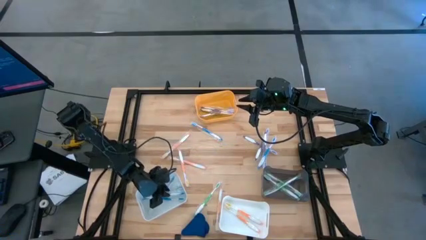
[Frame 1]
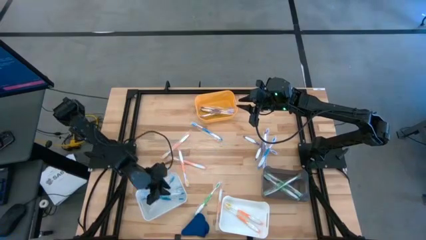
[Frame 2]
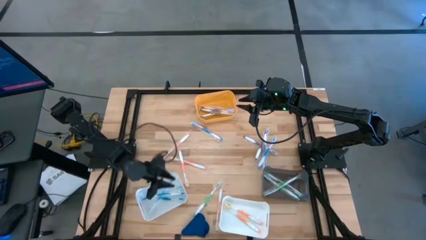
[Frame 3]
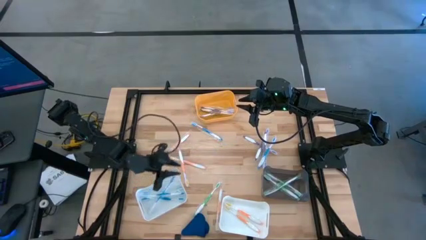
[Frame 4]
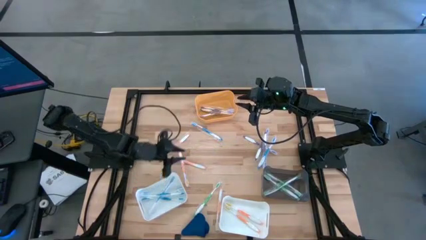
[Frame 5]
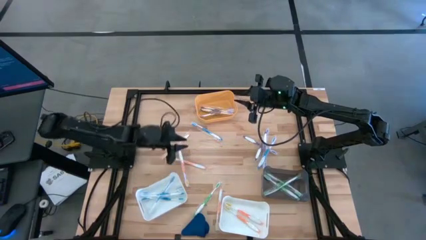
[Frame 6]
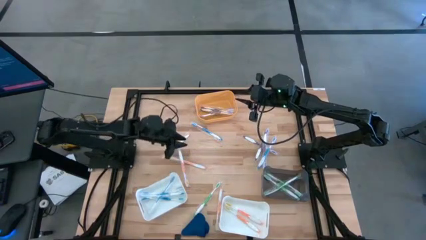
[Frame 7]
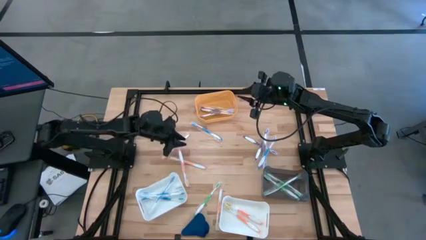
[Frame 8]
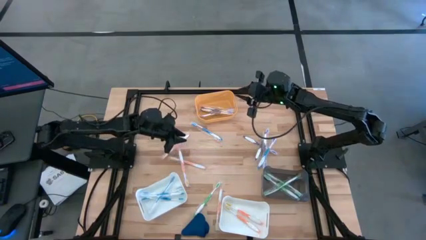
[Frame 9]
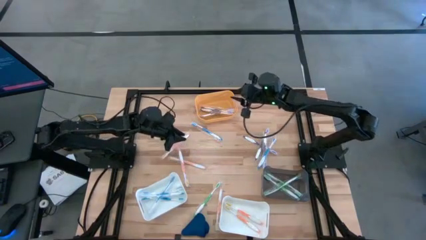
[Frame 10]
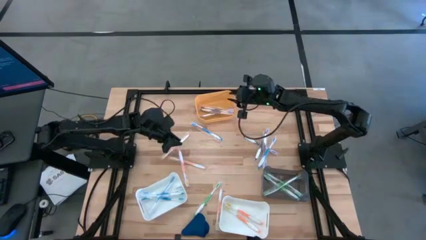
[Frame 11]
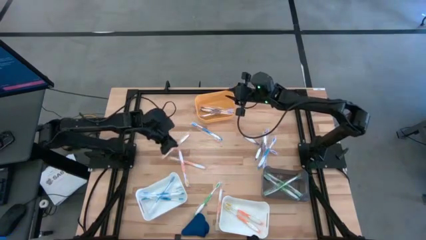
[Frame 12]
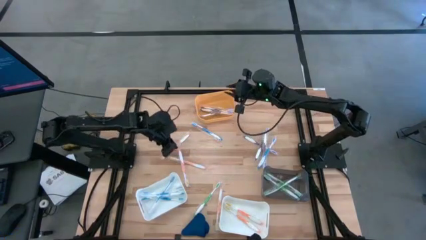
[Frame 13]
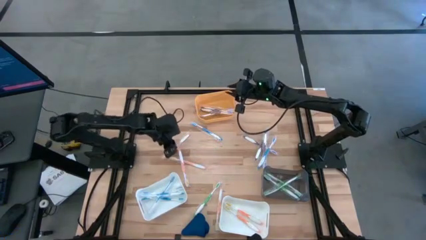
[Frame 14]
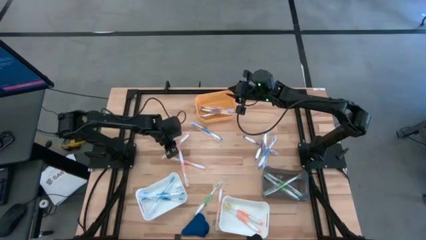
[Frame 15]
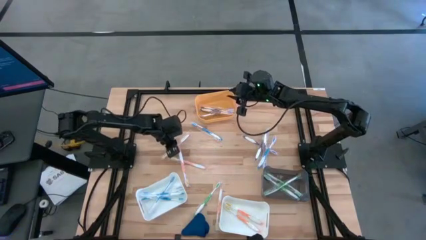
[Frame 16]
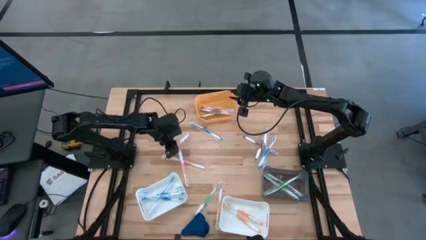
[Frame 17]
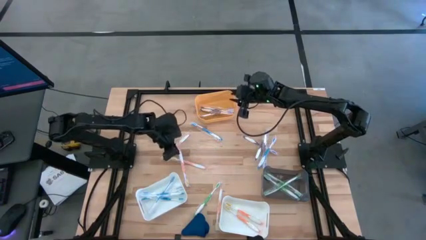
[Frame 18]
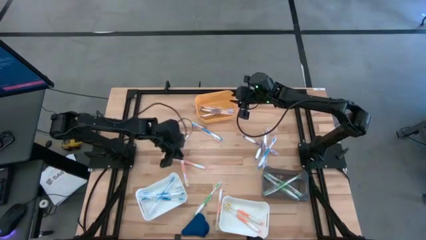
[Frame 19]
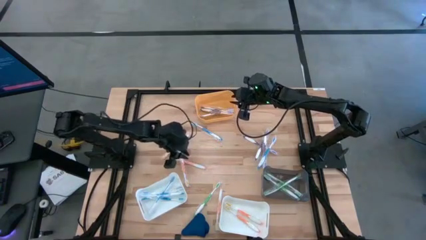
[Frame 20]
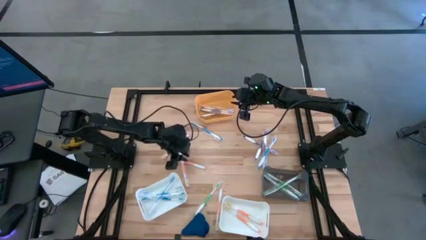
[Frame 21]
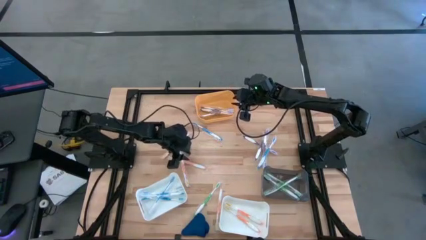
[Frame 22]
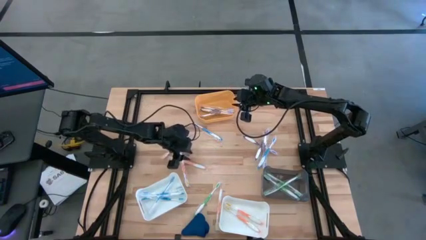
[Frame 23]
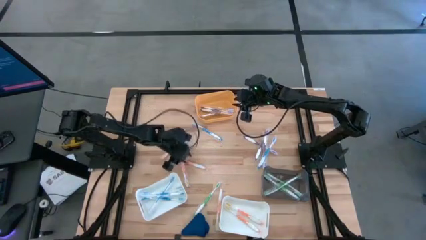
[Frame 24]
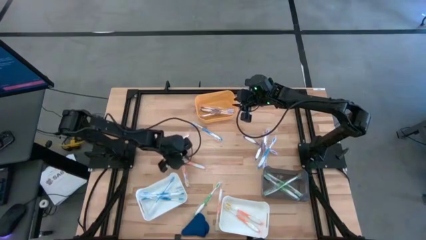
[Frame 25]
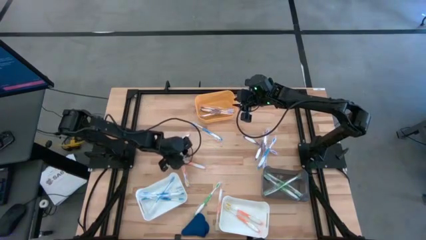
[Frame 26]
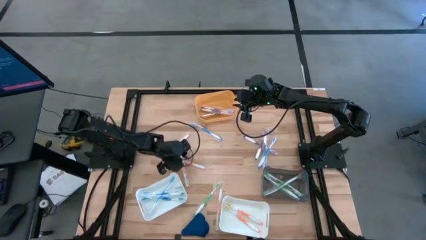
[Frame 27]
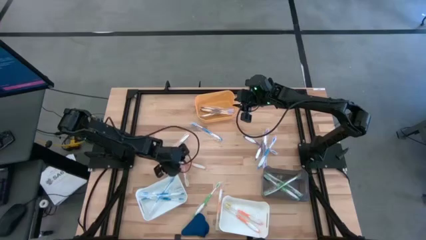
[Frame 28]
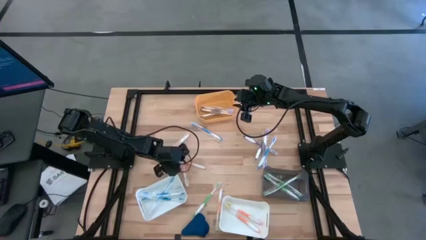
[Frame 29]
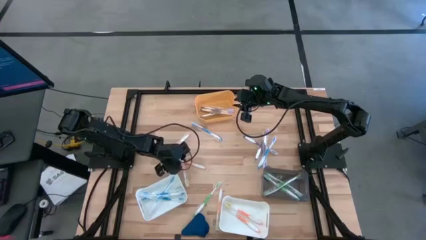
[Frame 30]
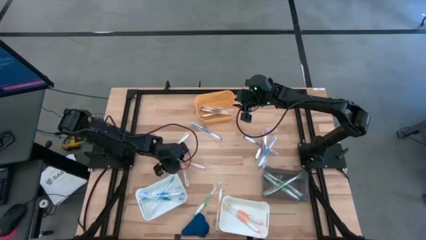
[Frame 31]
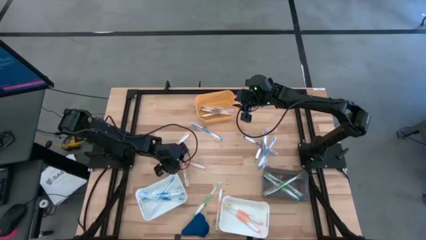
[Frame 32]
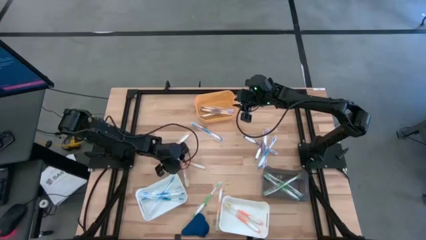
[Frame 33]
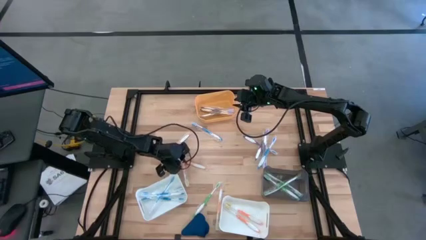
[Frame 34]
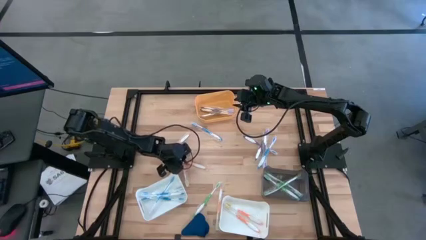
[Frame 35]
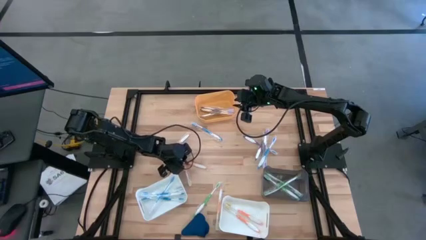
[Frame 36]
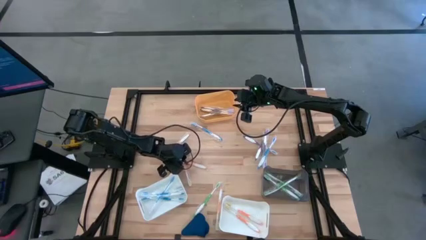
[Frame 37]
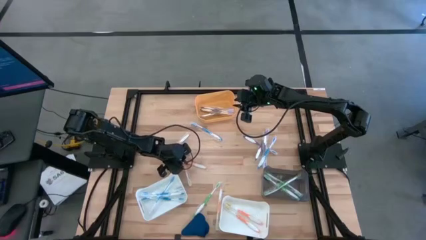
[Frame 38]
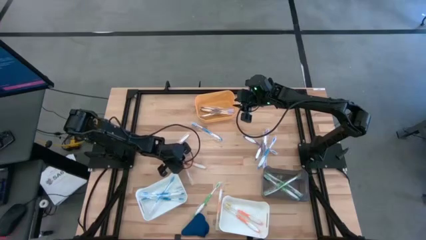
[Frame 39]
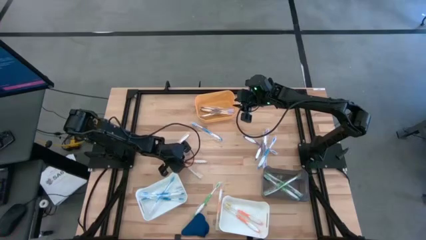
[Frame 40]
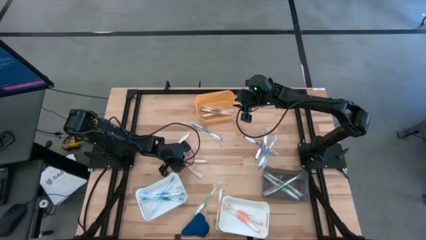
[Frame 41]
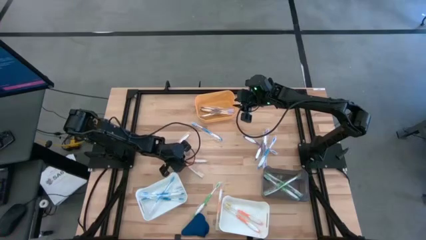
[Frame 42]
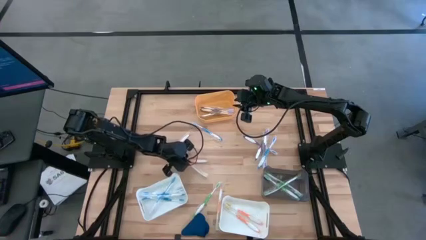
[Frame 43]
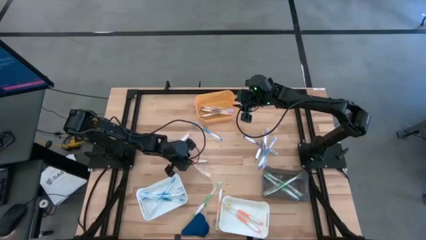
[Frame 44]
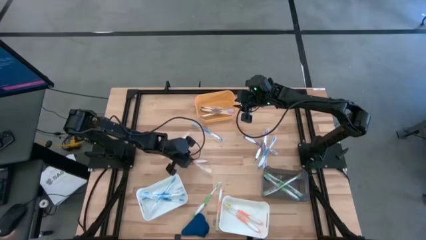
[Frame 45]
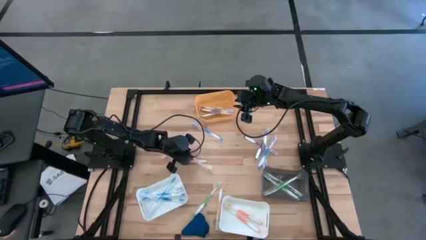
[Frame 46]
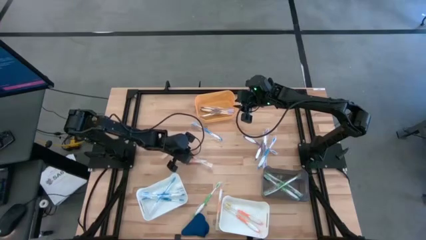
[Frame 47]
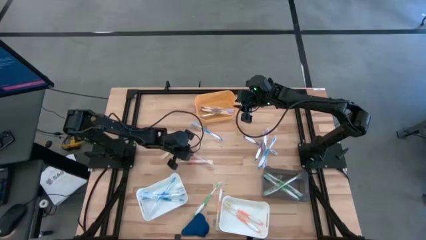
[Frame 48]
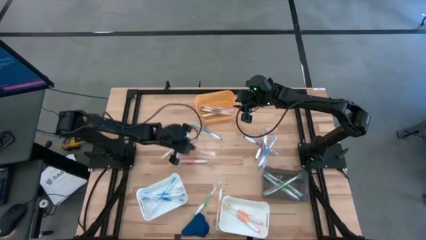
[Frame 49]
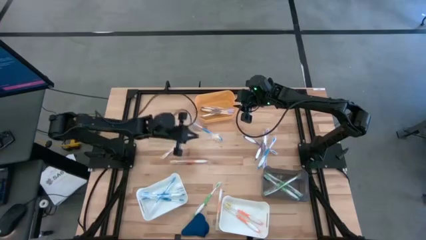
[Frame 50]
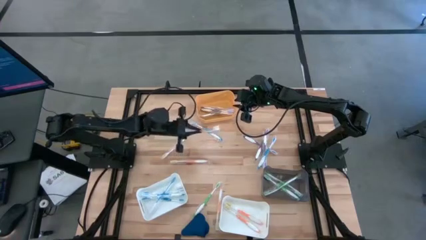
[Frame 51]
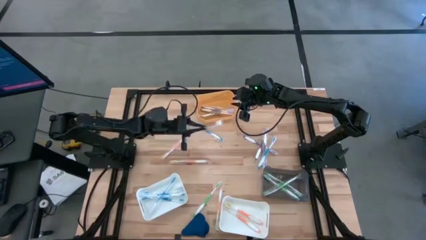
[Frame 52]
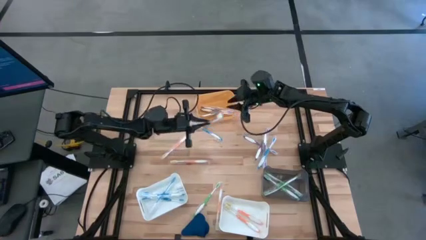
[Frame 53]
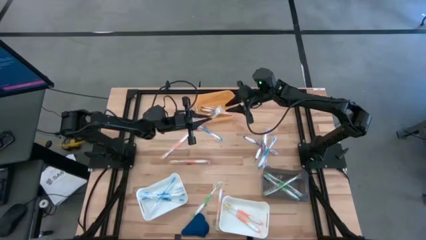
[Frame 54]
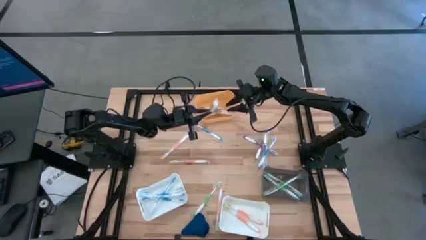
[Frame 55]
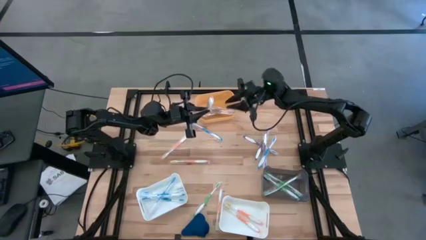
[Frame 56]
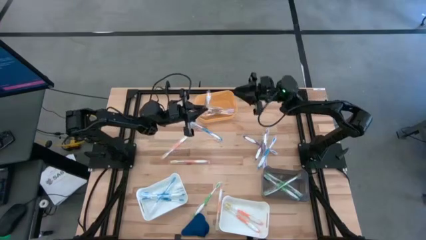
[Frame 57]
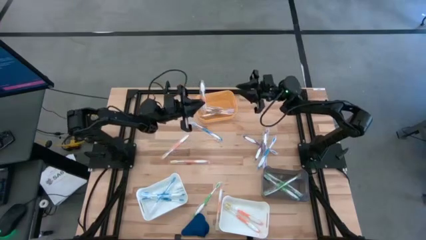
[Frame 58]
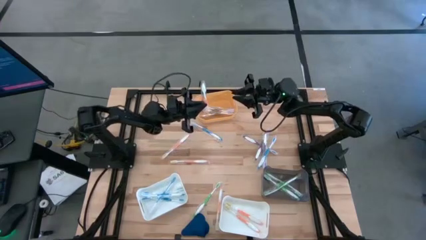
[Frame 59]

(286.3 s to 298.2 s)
Task: Pick & Place Toothbrushes
Put the orange toothbrush into the right white bin

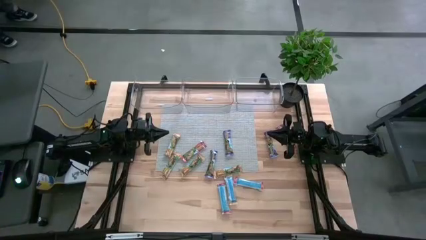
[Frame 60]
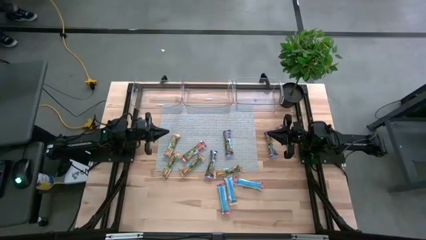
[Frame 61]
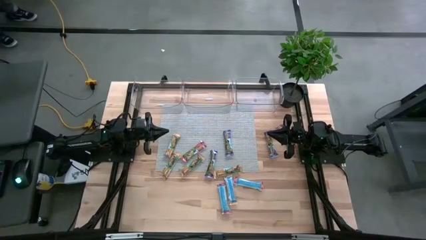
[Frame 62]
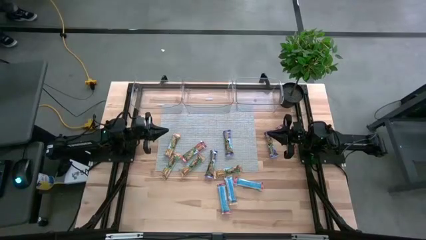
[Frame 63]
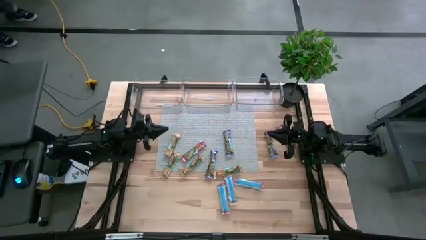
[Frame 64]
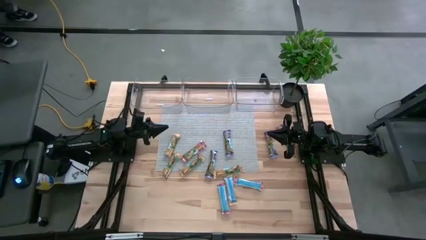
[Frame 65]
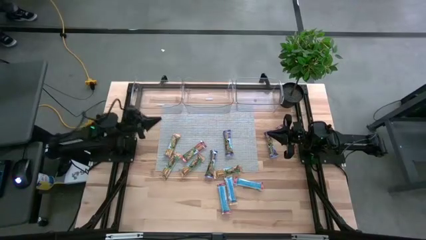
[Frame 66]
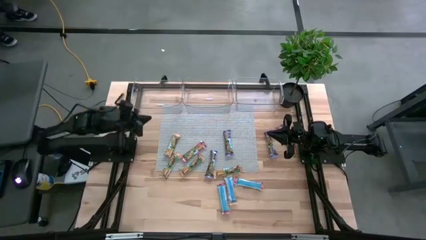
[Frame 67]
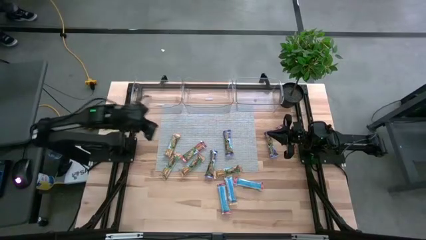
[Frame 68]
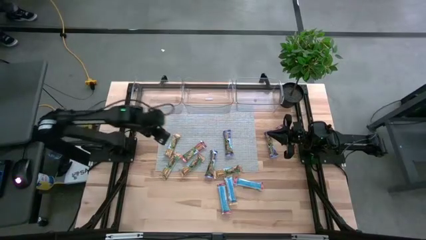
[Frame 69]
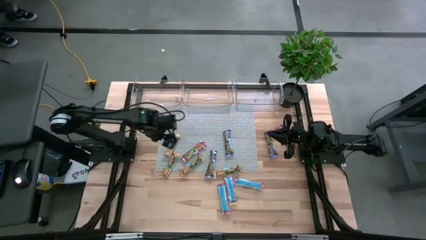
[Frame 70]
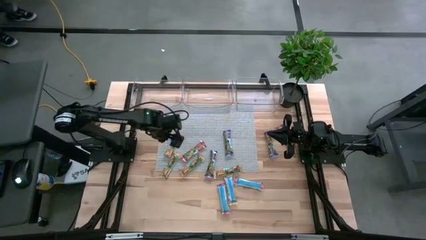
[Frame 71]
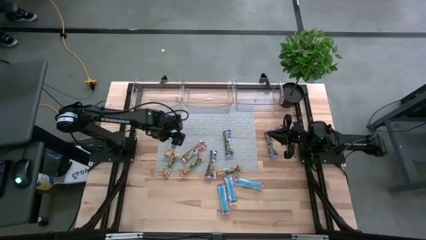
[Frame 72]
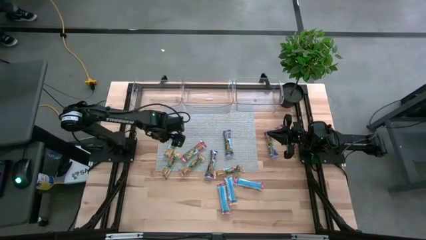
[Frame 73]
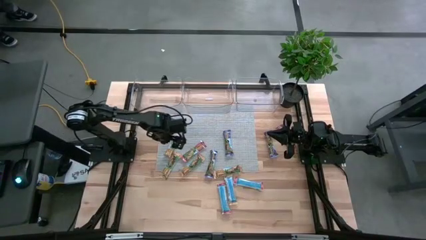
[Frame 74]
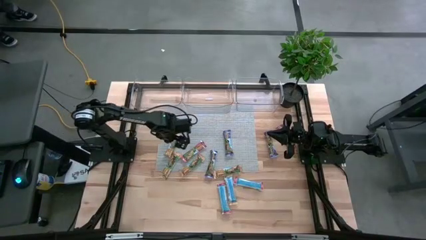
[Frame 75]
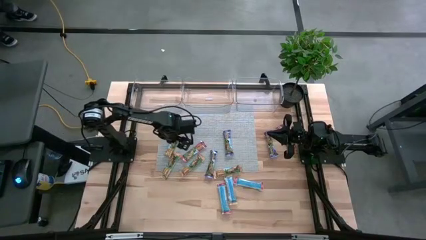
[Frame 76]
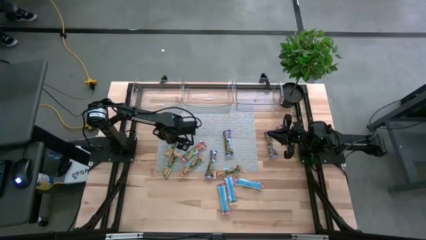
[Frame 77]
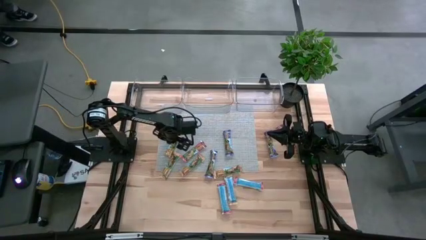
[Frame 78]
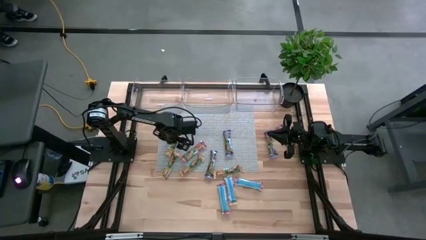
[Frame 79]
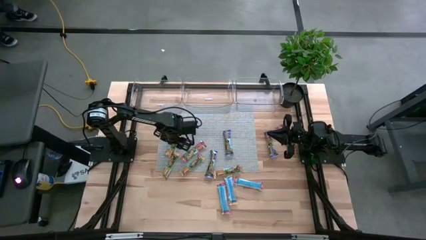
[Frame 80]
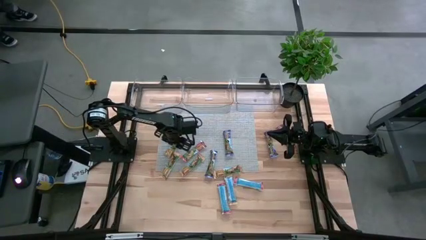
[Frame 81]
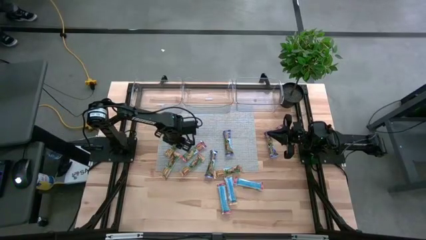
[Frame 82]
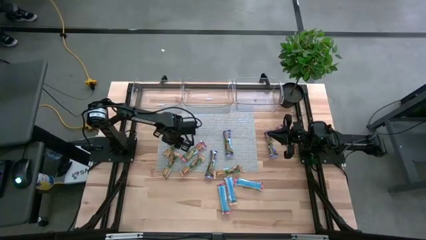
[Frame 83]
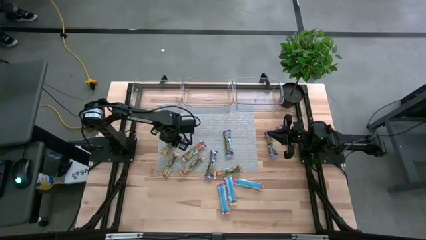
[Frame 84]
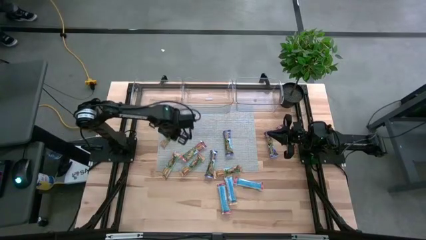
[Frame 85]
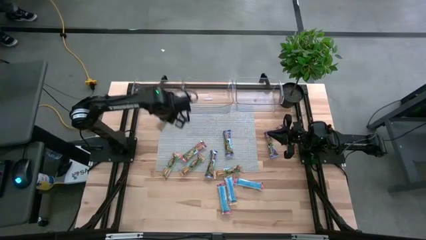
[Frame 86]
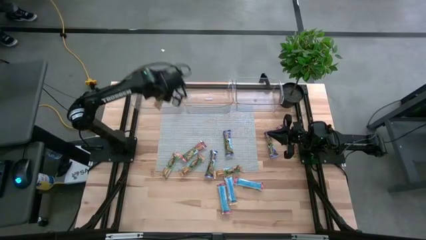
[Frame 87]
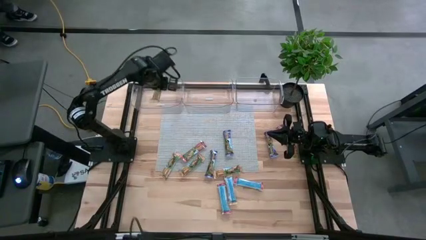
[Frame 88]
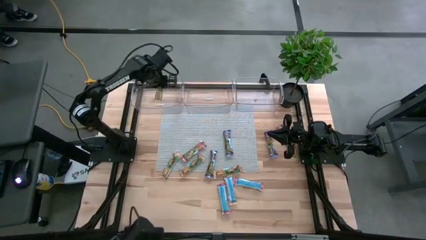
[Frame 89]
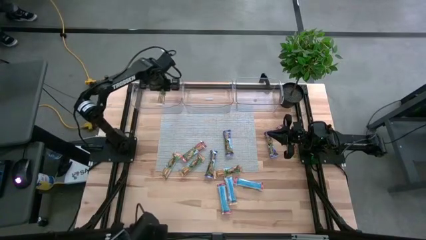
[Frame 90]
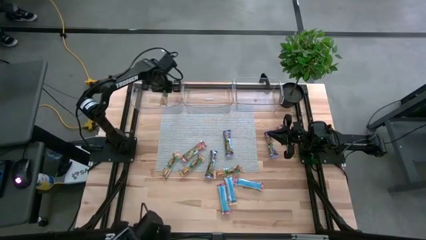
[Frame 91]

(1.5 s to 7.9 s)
Task: Pick and place Granola Bars by type
Put the yellow granola bar into the left transparent bin
